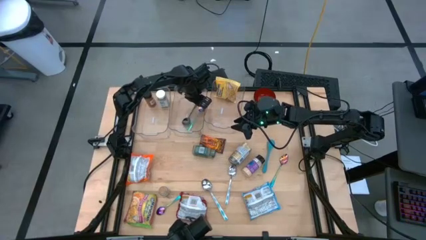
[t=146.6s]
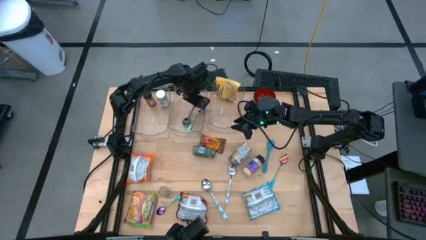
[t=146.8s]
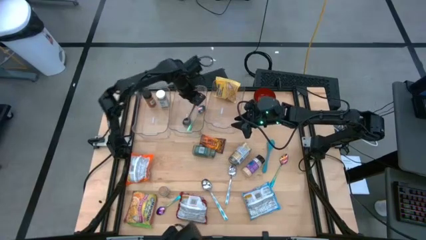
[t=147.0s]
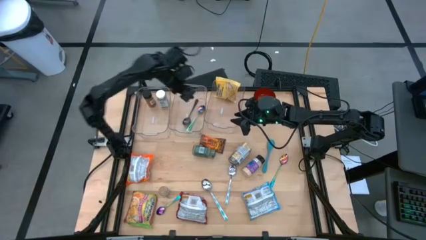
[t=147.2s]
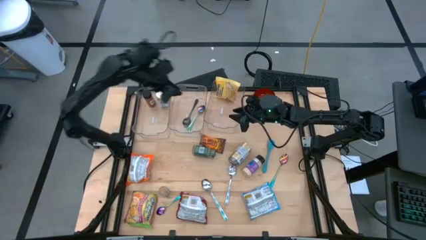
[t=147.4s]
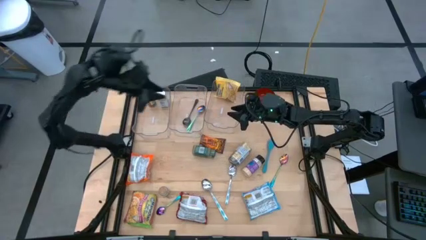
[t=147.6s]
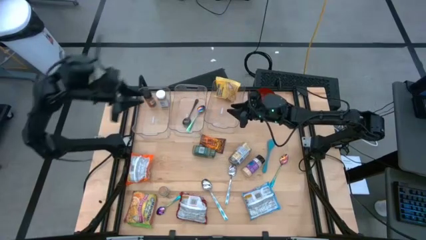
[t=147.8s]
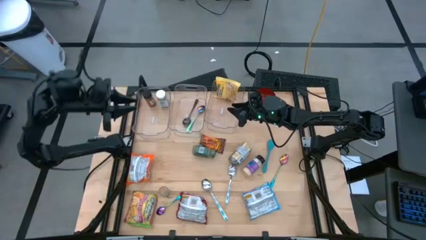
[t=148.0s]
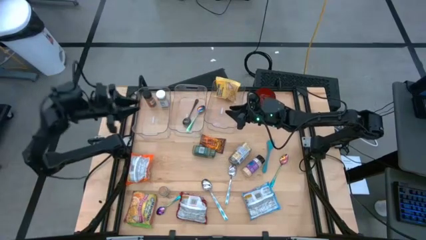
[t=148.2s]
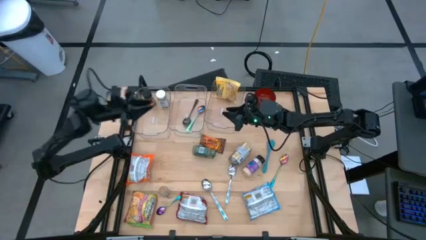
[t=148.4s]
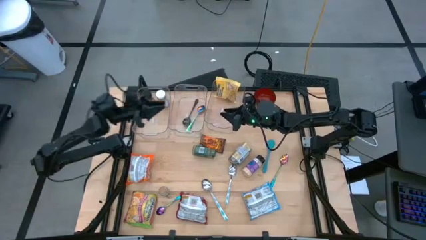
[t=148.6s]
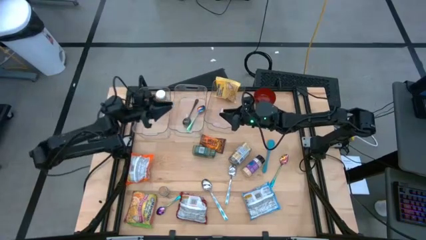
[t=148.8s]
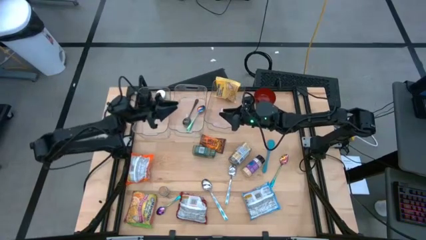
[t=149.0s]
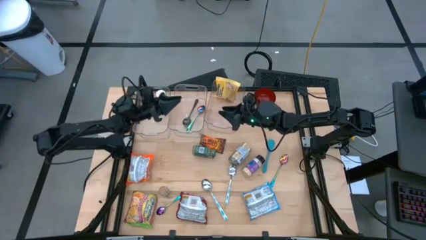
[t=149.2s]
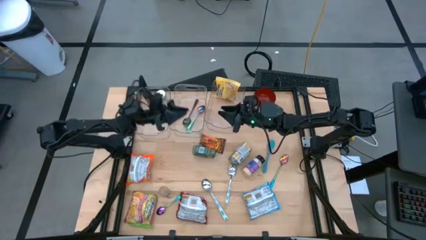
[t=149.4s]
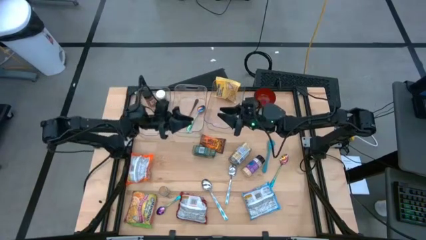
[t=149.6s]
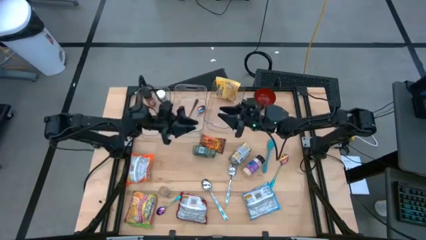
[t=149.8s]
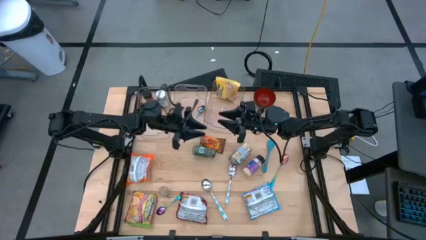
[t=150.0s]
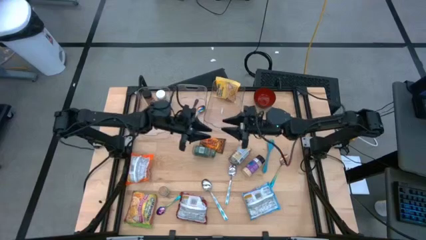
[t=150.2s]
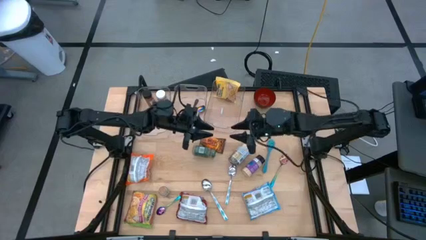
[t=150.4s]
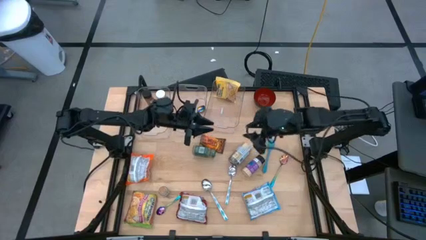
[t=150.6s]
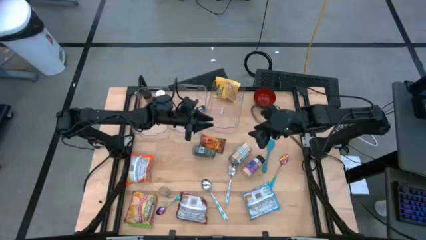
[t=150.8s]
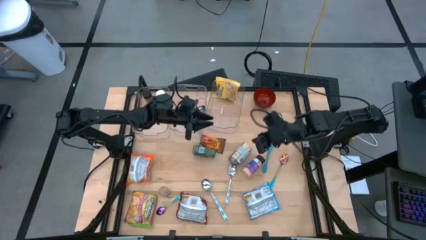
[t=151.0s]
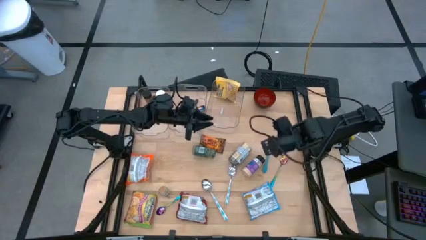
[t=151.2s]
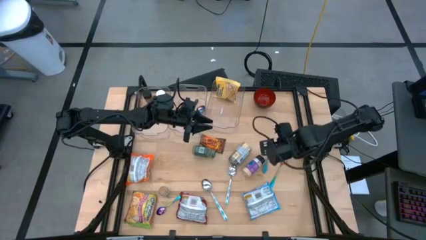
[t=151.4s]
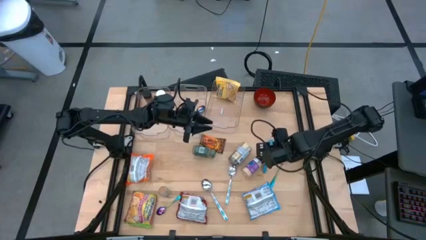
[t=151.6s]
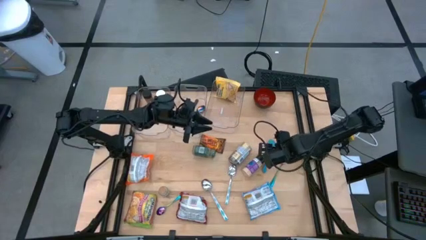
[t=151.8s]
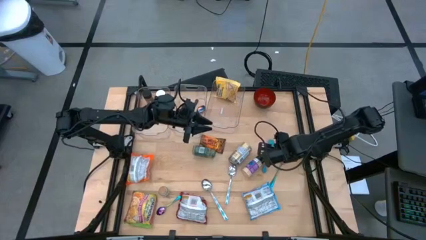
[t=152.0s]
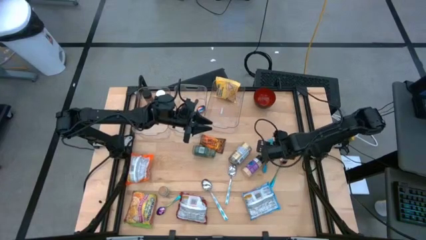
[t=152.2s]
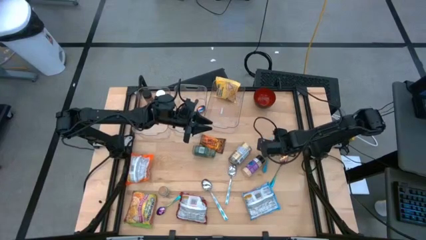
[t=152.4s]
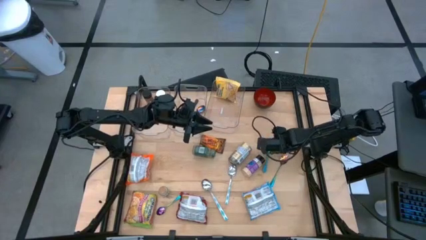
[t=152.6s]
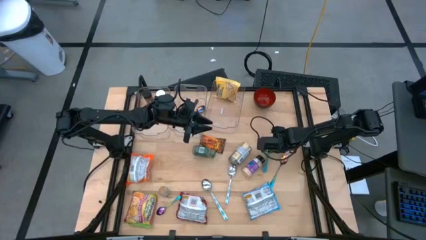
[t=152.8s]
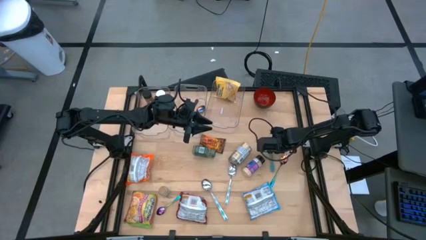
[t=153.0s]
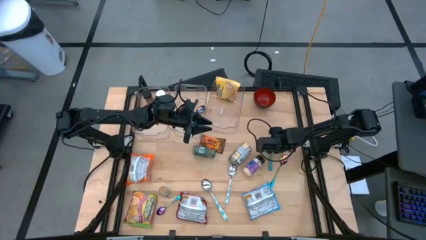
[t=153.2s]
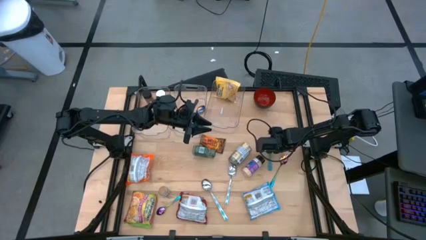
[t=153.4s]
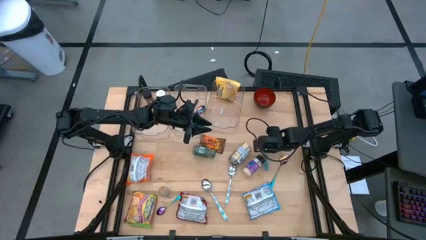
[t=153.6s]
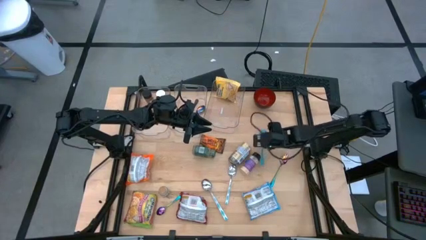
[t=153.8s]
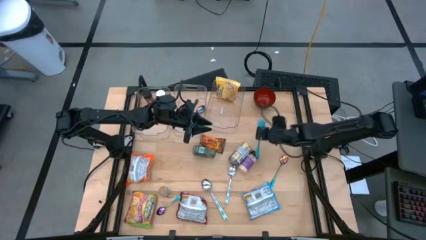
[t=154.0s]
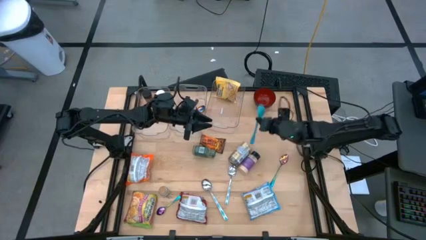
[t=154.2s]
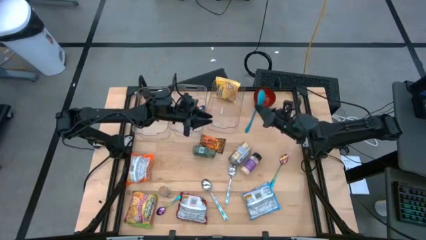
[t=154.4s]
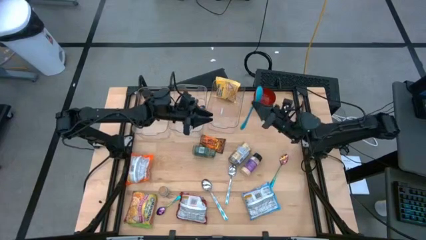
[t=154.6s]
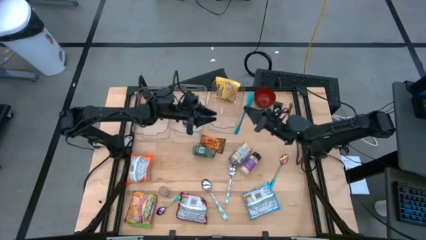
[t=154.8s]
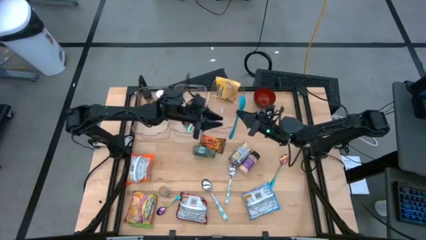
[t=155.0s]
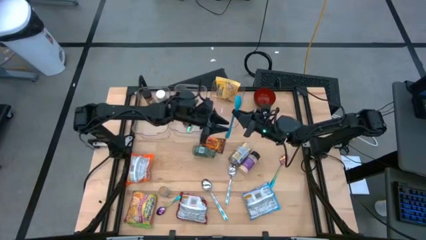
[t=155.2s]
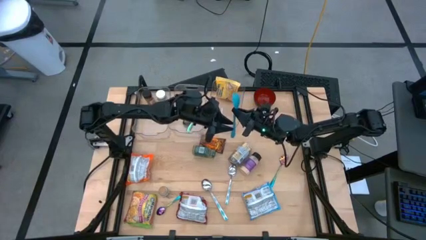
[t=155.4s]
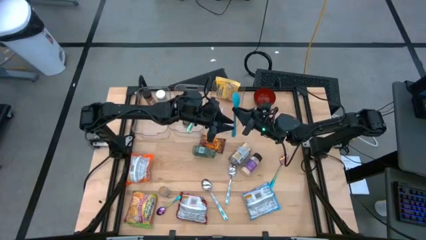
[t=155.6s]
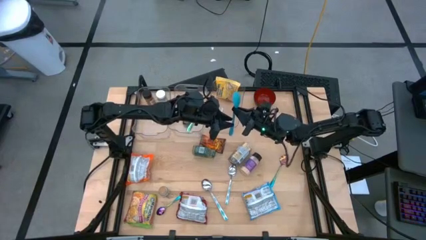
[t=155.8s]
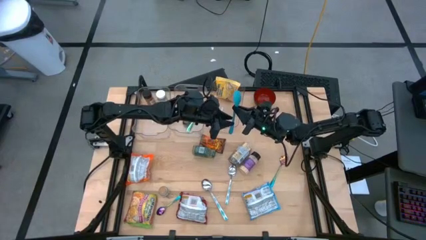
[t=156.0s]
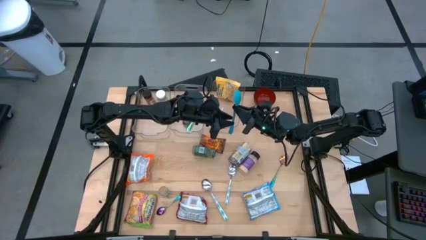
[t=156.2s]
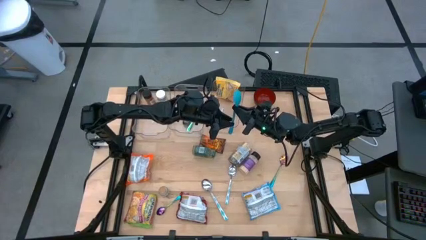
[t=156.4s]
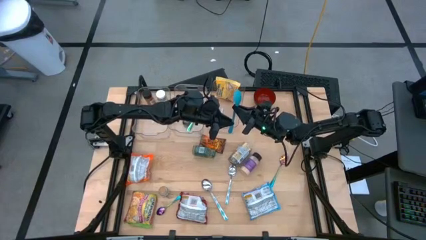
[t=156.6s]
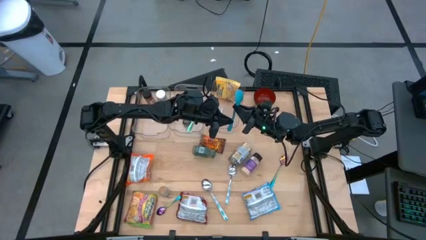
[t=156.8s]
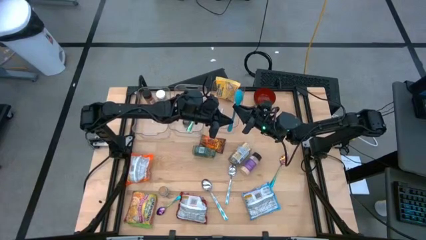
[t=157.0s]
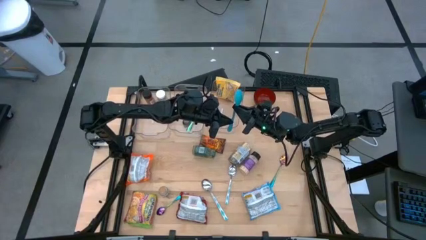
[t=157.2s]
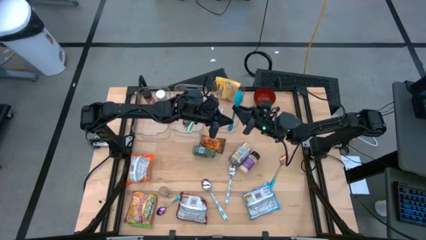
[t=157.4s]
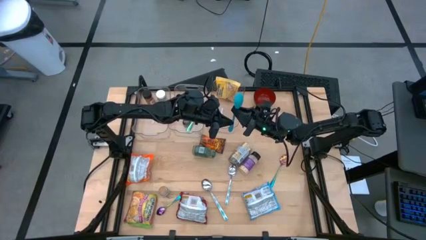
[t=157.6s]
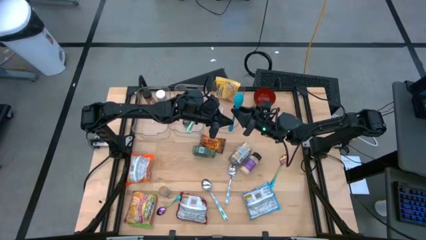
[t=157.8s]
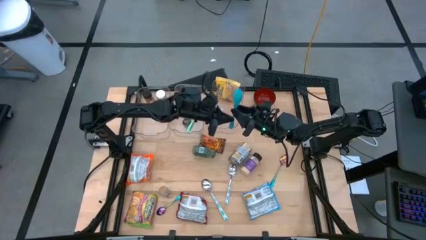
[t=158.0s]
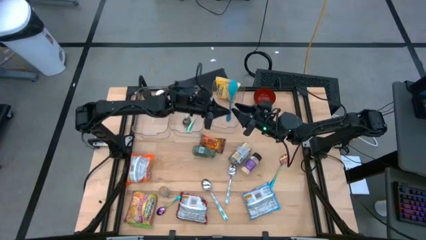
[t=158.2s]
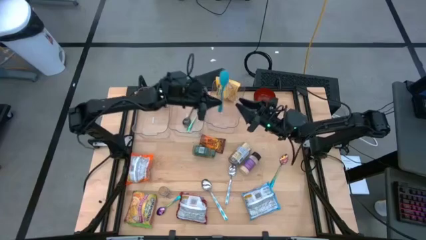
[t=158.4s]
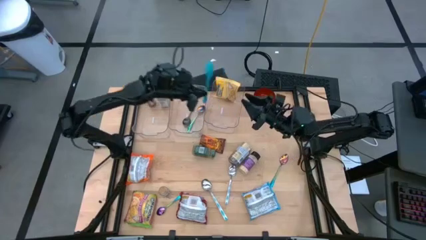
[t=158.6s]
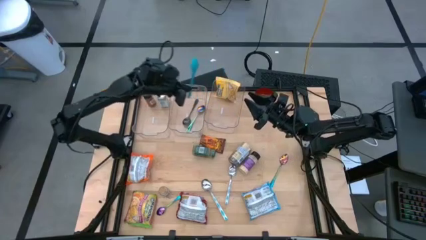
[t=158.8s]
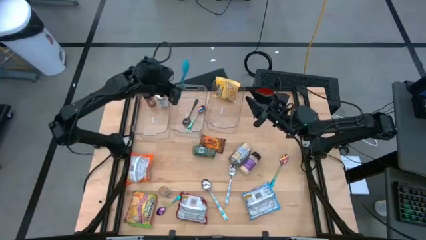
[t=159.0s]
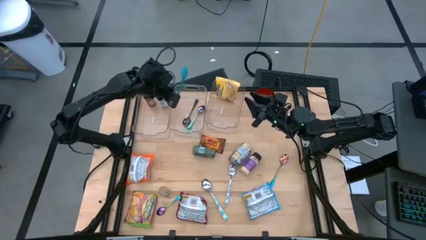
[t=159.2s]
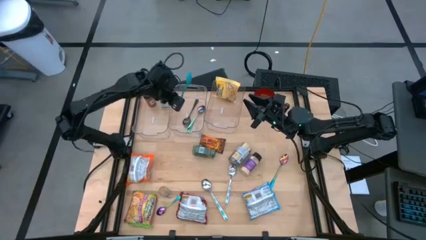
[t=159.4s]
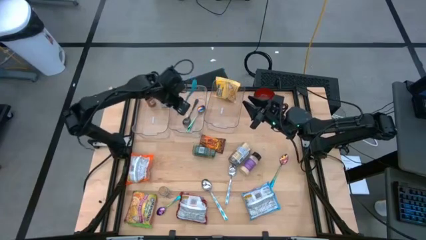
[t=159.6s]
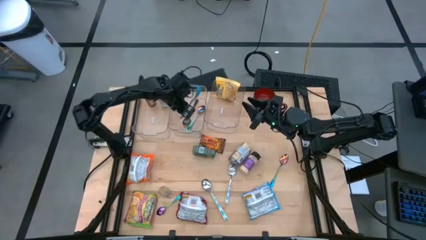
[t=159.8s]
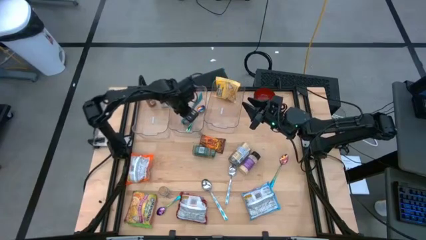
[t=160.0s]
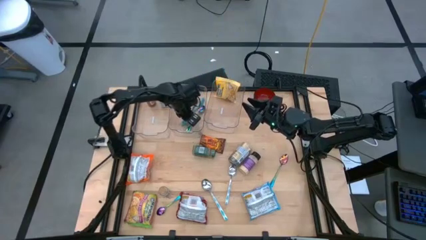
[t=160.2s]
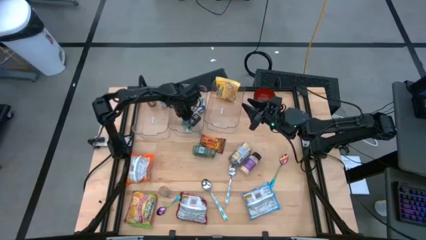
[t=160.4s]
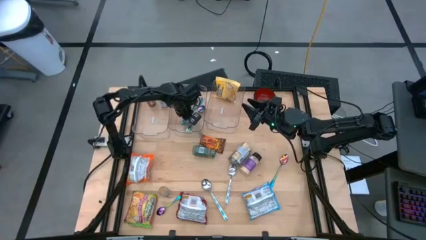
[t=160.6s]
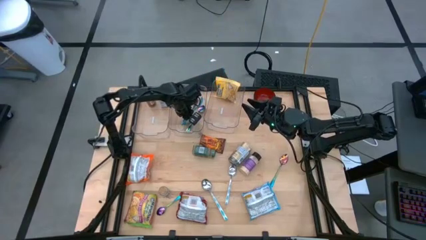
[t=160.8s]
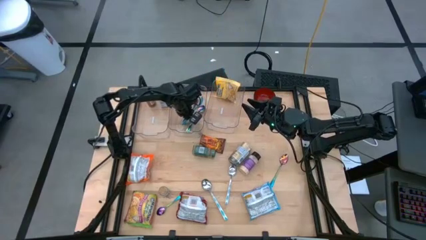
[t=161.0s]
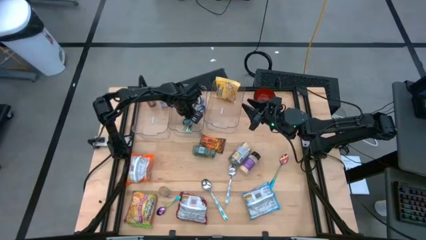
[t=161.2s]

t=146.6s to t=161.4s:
Task: Pick & Place Food Item
Put the blue baby spoon into the middle transparent bin

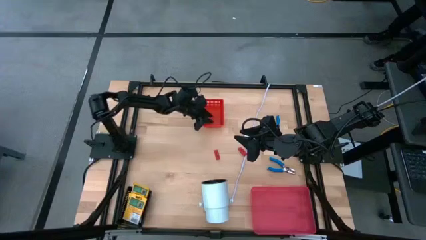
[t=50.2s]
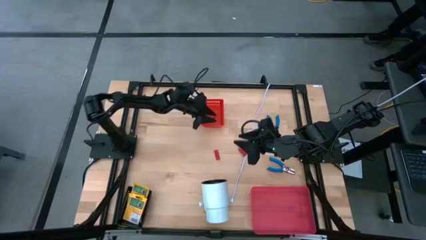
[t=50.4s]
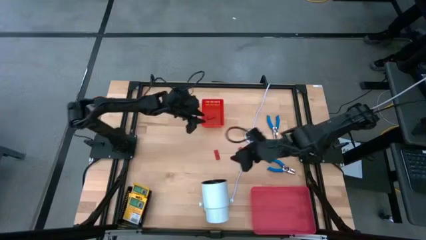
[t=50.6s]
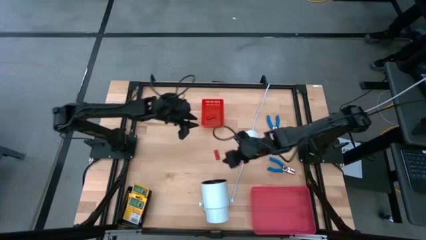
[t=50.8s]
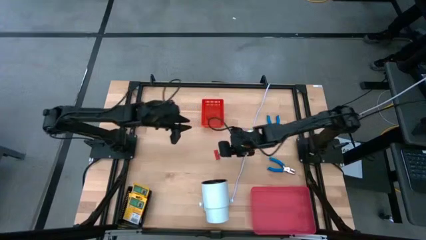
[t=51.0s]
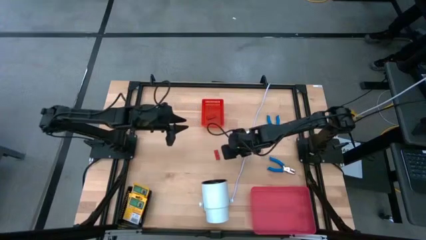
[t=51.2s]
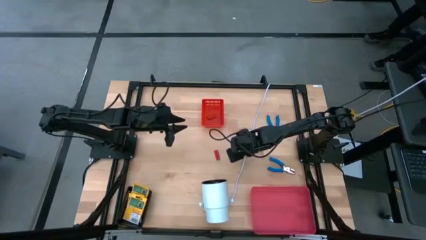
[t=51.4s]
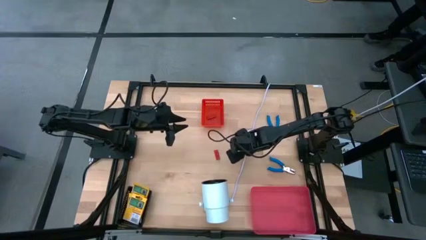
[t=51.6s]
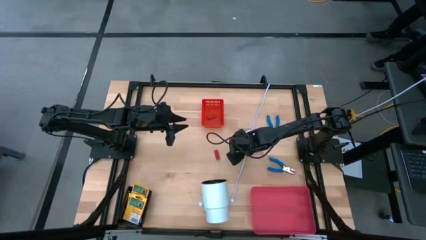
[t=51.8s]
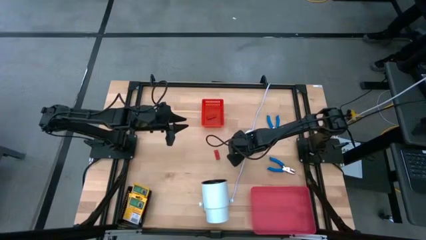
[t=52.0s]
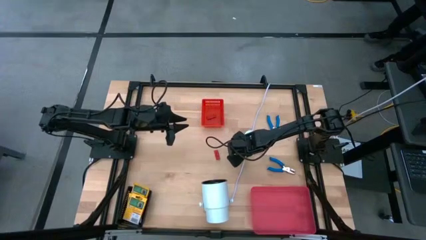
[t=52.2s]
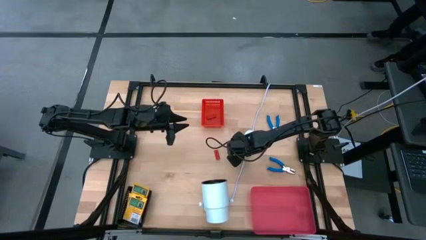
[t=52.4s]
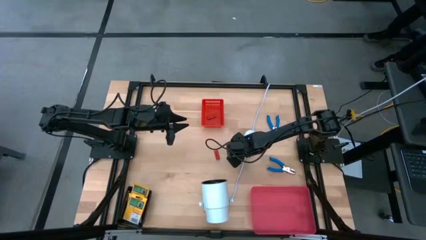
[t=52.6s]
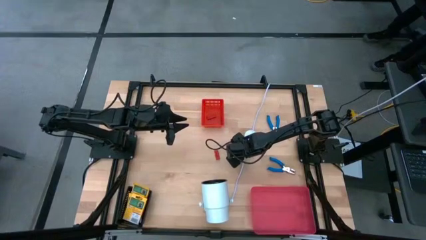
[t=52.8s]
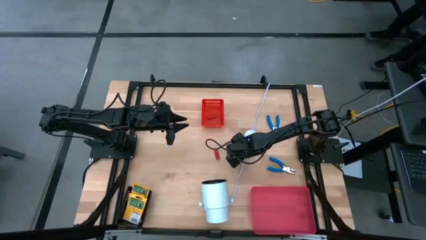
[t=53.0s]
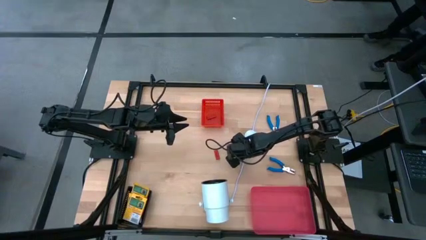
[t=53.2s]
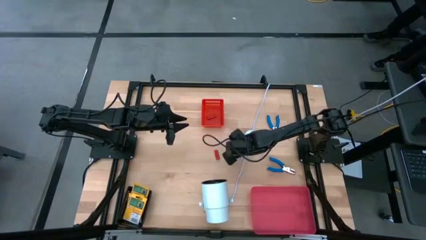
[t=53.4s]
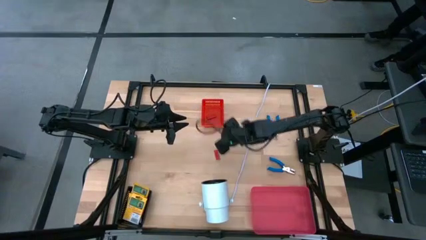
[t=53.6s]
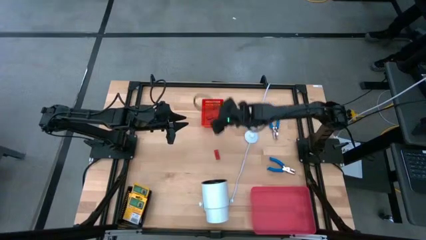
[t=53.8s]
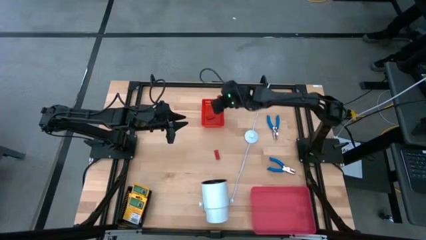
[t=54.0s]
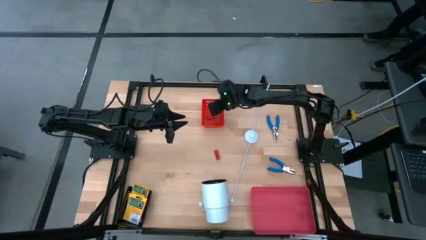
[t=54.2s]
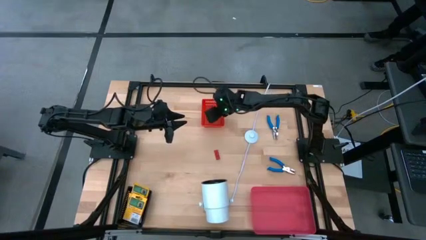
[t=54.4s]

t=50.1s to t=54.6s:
Task: Pick & Place School Supplies
Put the red eraser into the red bin
